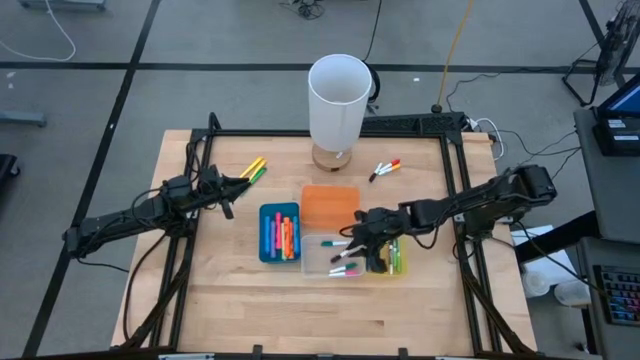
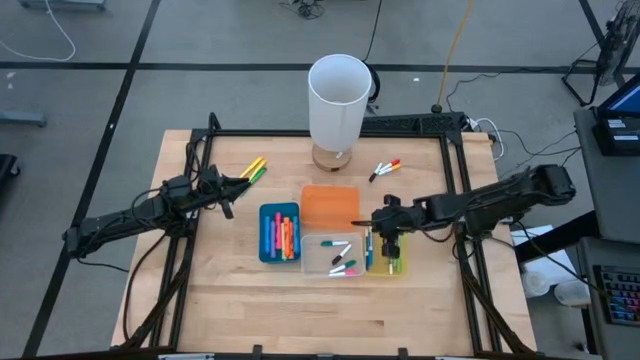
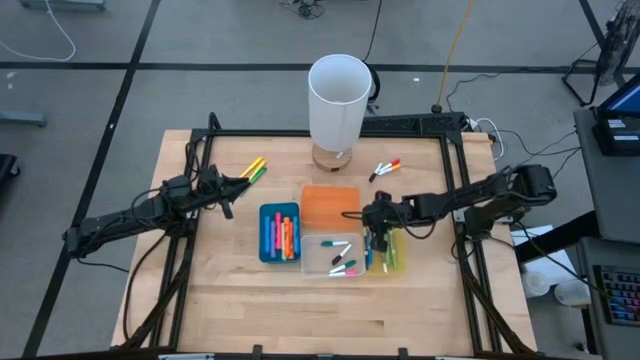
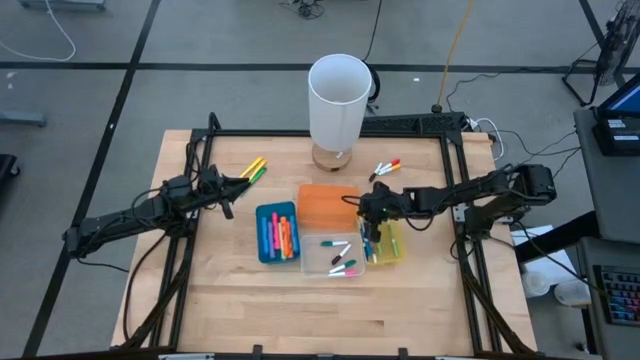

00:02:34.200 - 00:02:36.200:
Task: Pick & Place Markers
Adjust the yellow bin on the table

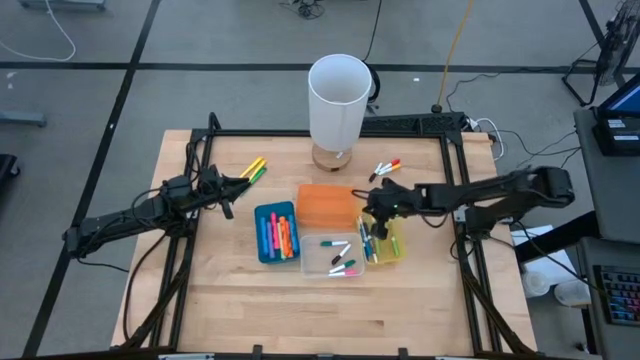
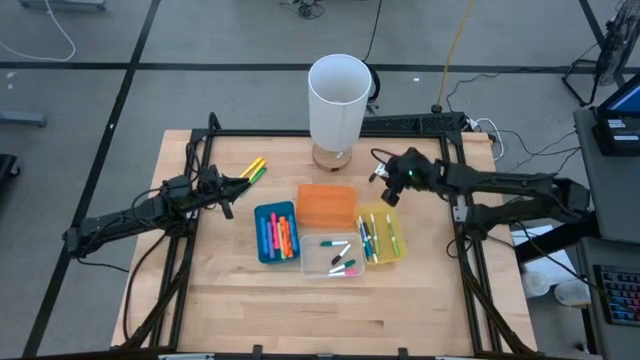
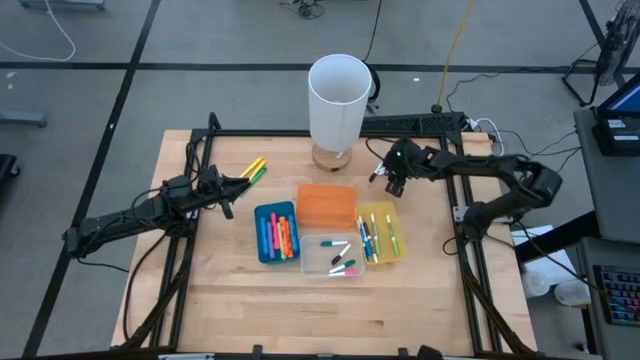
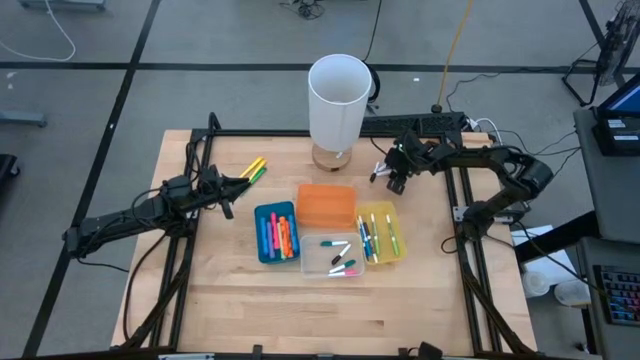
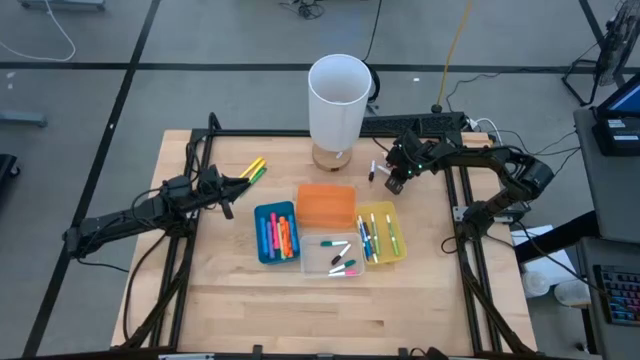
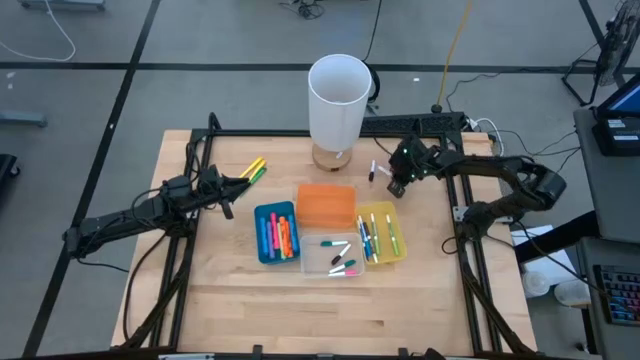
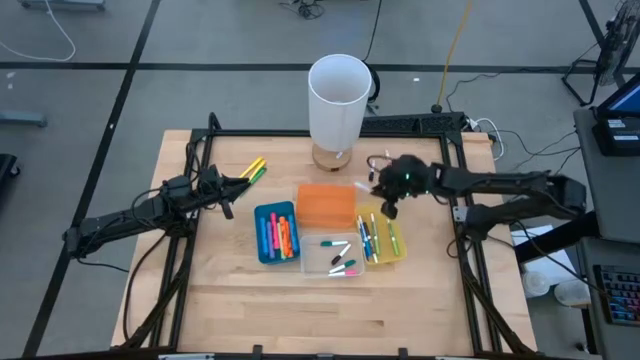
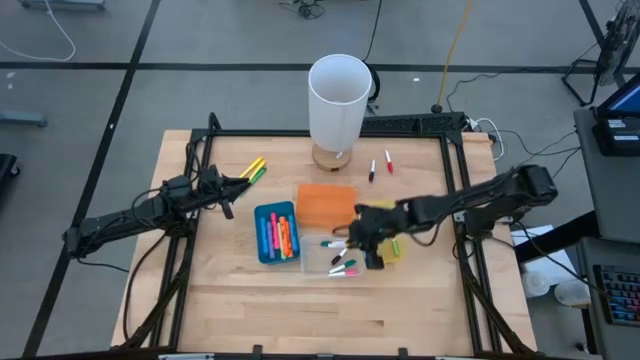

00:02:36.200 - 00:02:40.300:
Put the small yellow highlighter pen into the transparent bin

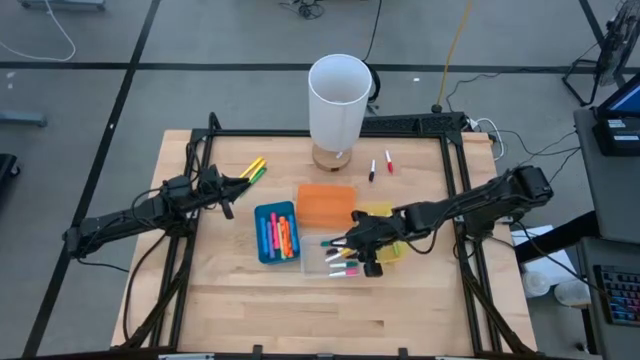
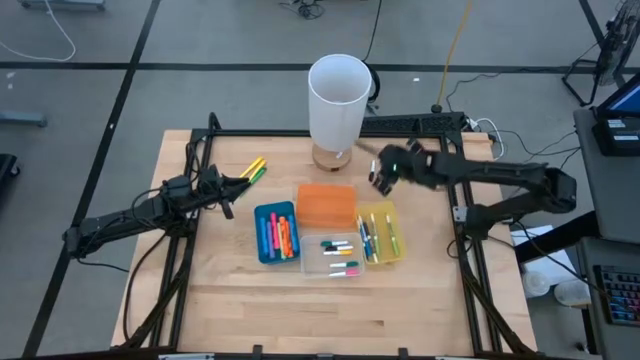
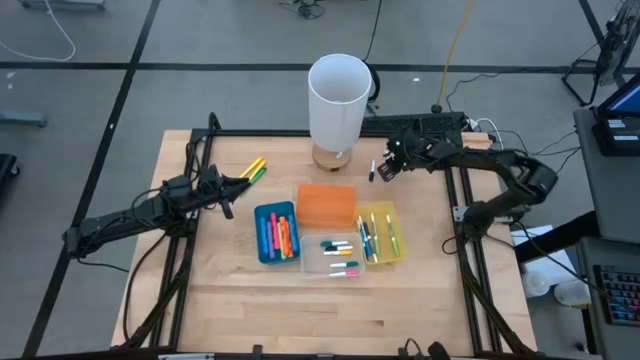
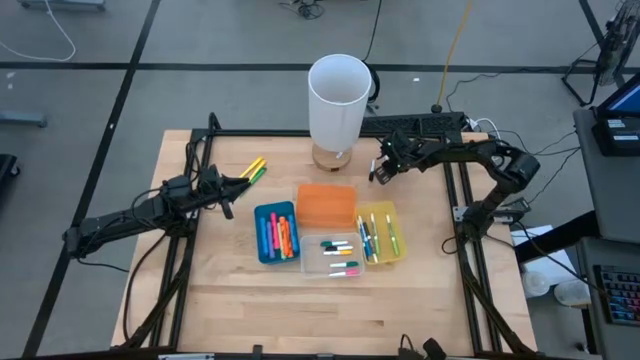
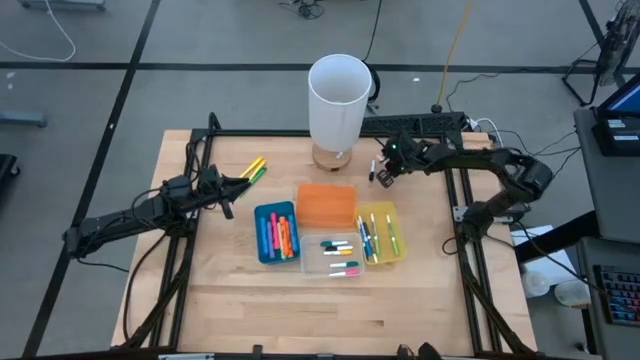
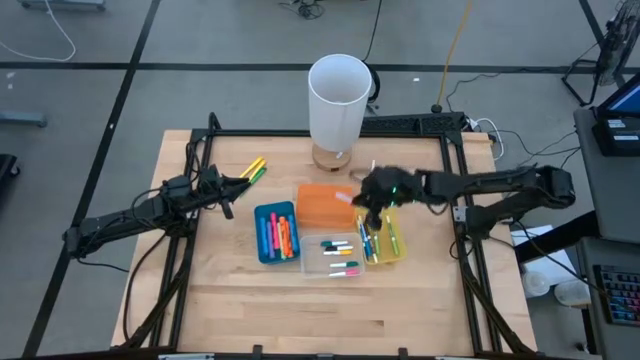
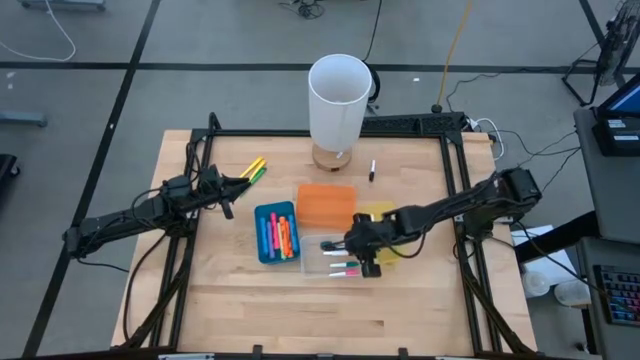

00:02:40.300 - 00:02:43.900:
Put the small red highlighter pen into the transparent bin

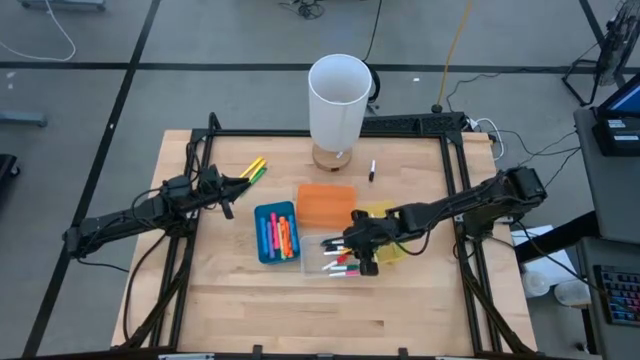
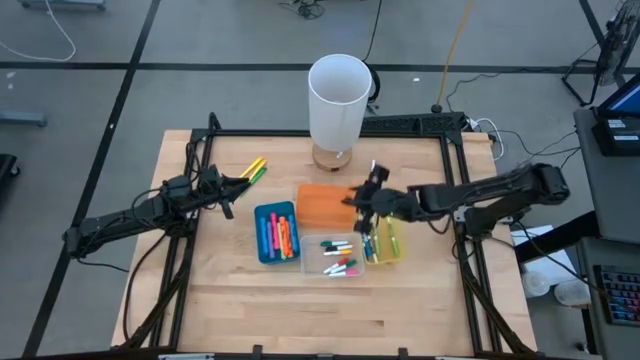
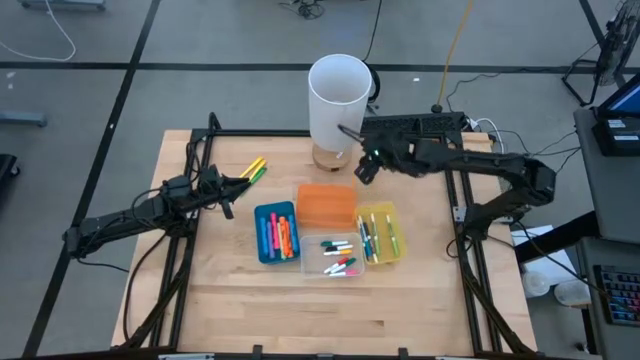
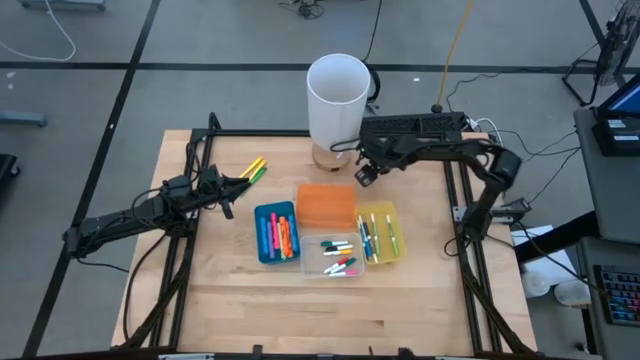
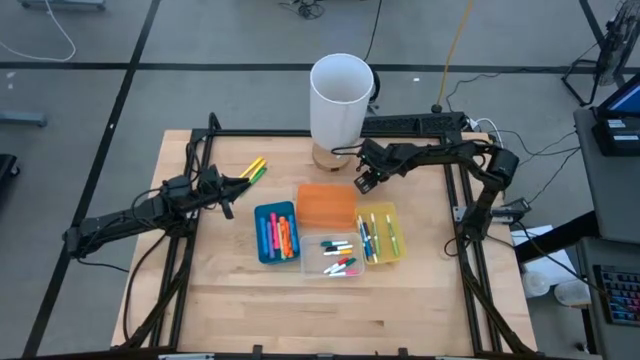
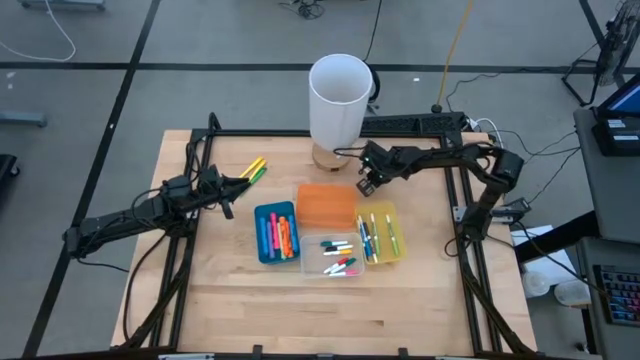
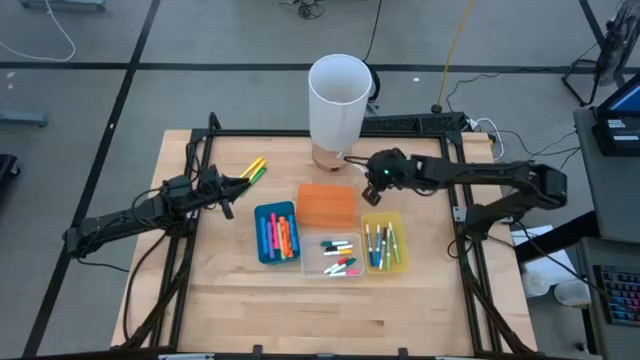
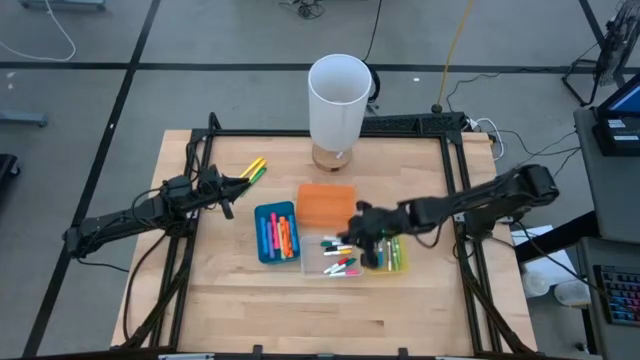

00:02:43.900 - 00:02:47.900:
Put the small black highlighter pen into the transparent bin

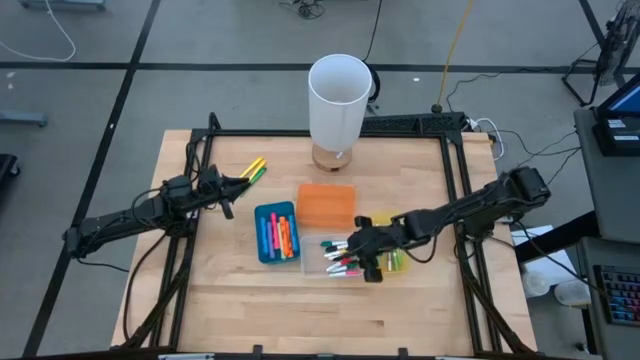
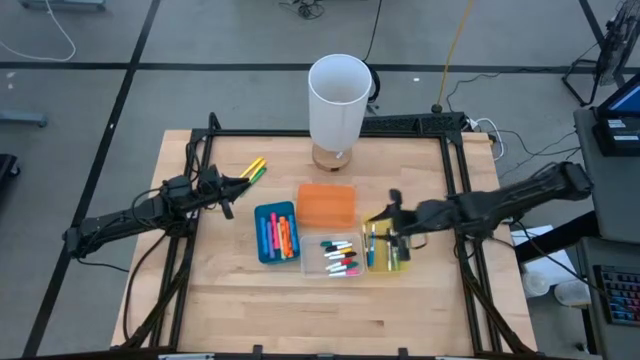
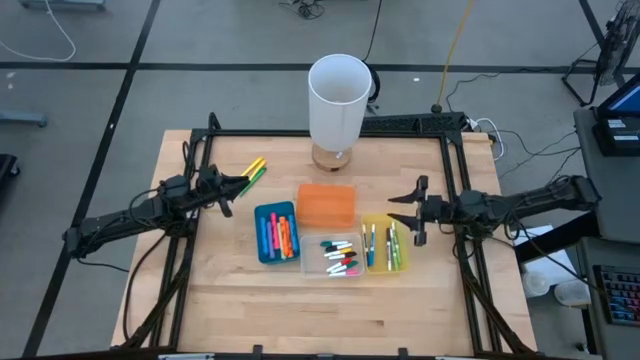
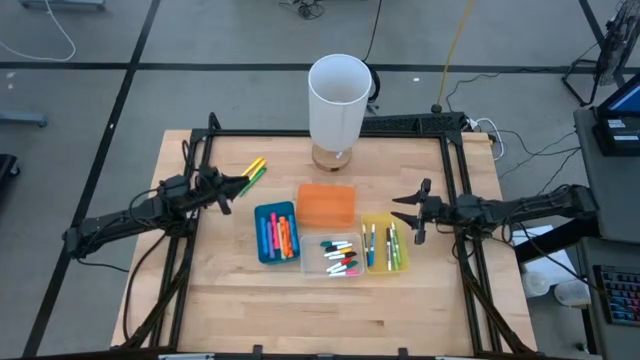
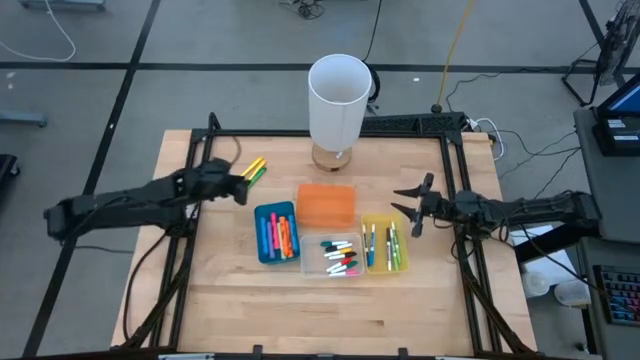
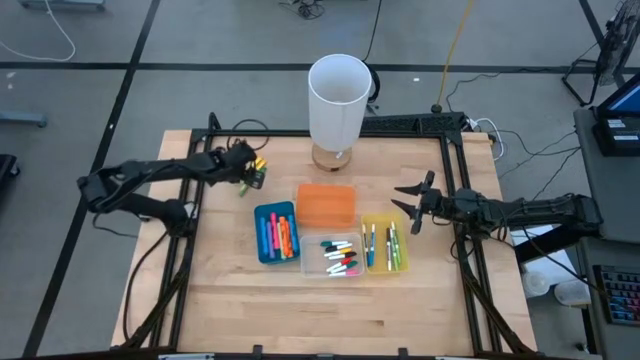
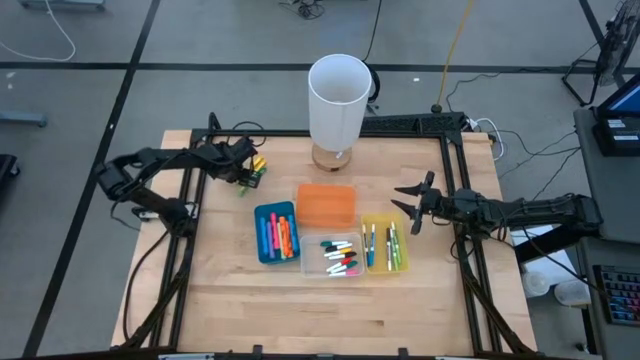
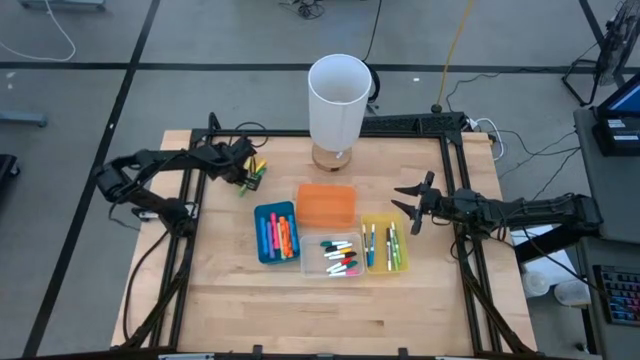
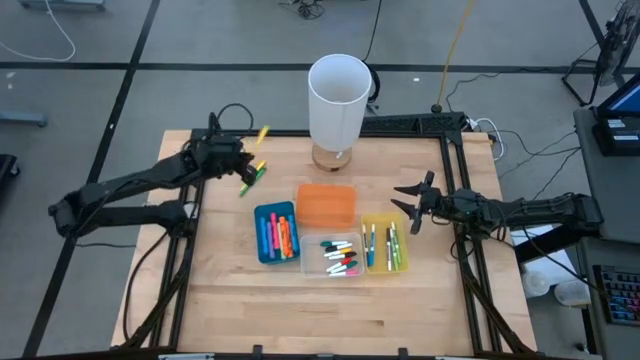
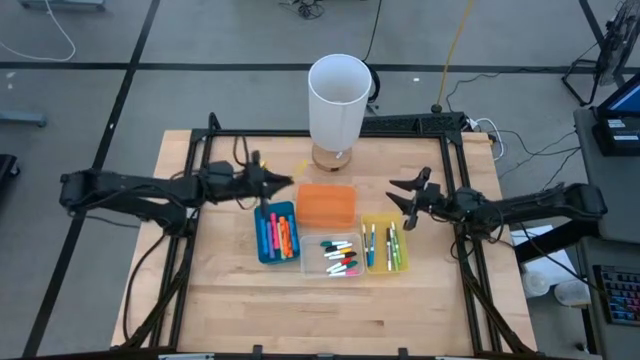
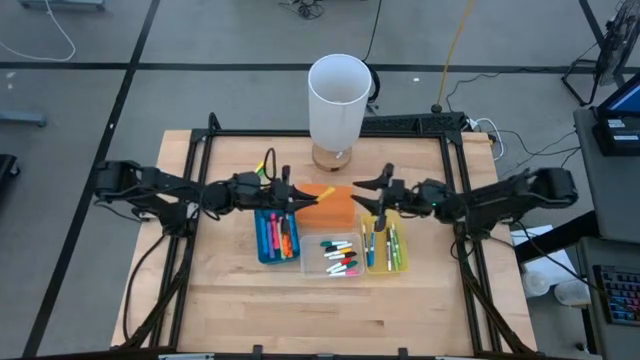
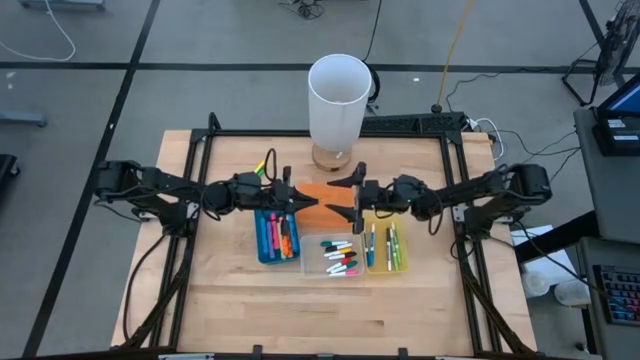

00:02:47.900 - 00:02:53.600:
Put the left yellow pen into the orange bin

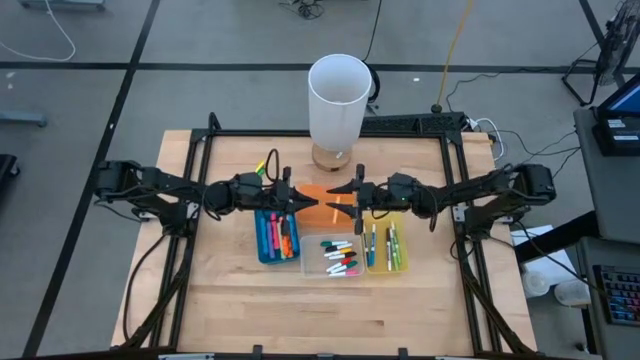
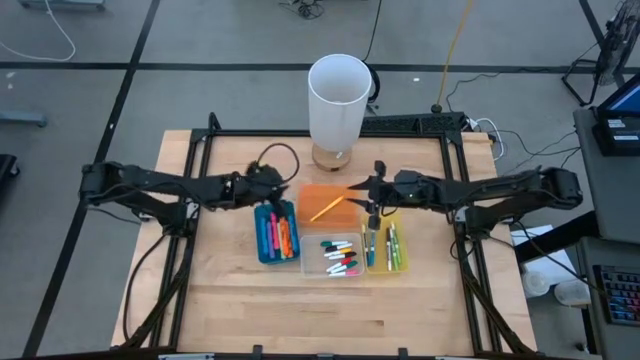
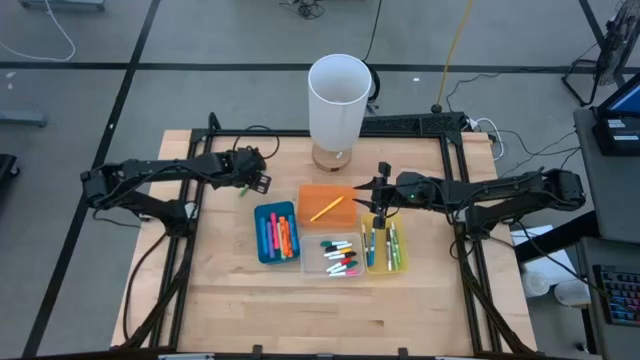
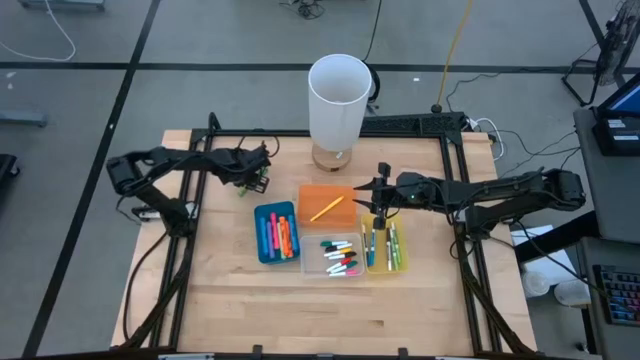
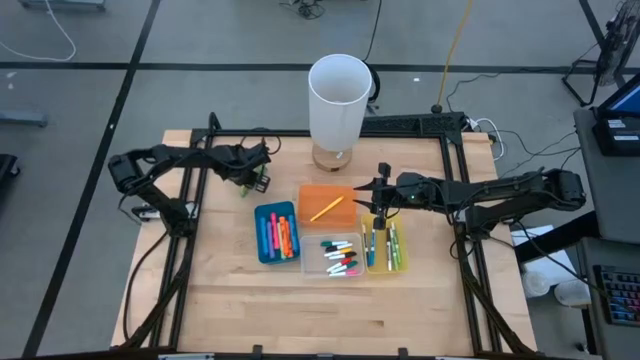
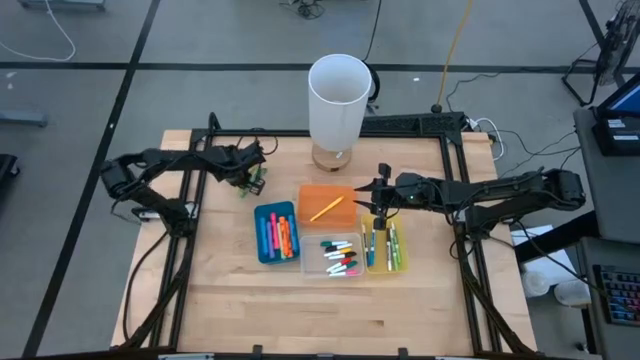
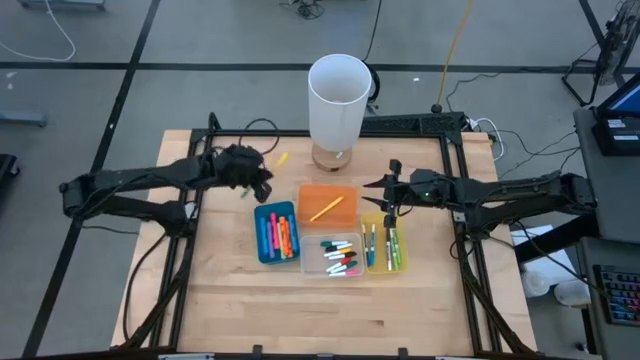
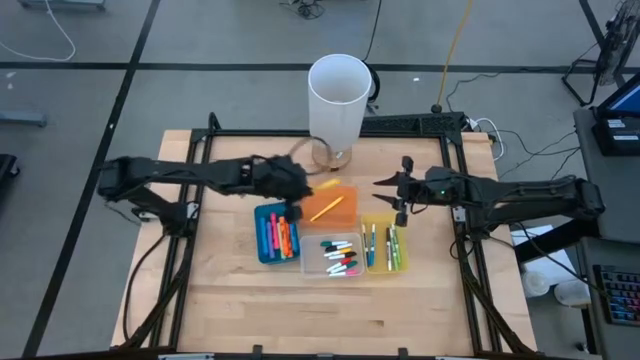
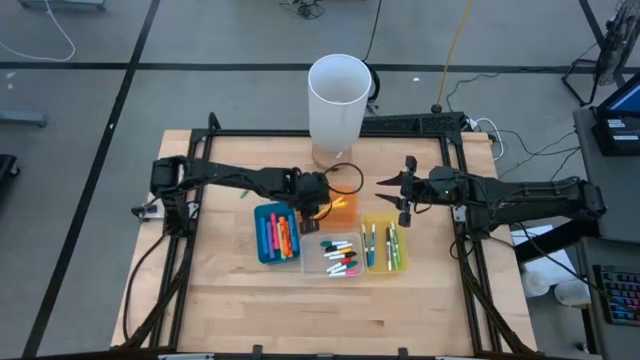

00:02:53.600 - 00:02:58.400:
Put the yellow pen into the orange bin
